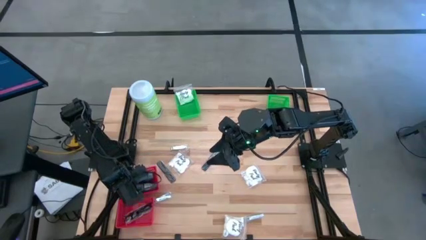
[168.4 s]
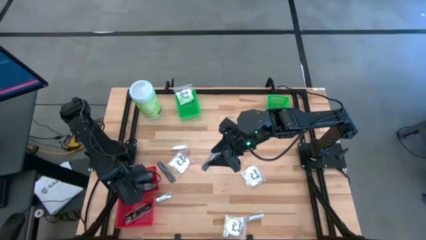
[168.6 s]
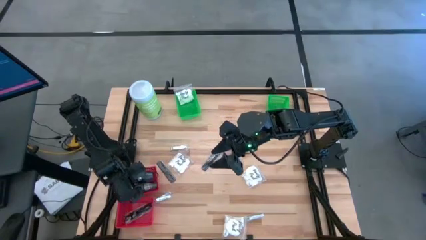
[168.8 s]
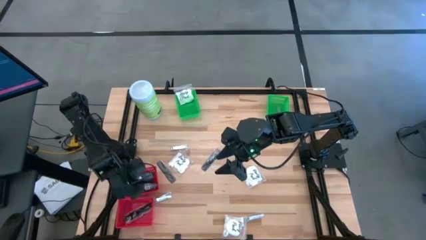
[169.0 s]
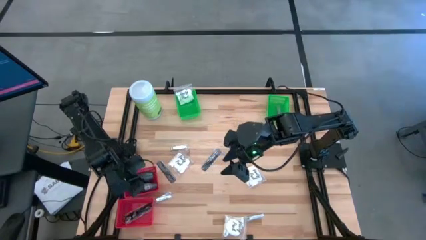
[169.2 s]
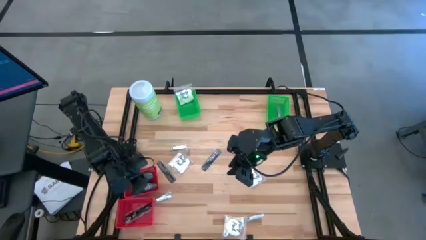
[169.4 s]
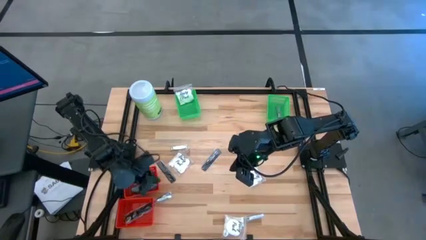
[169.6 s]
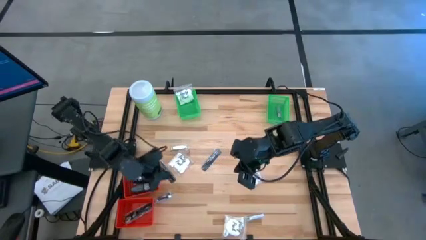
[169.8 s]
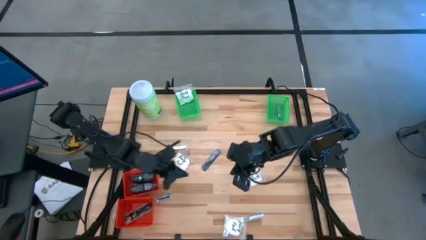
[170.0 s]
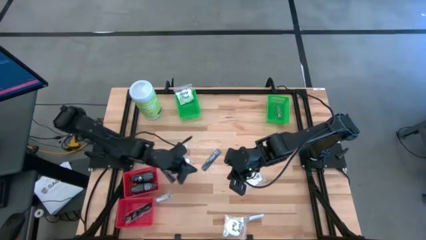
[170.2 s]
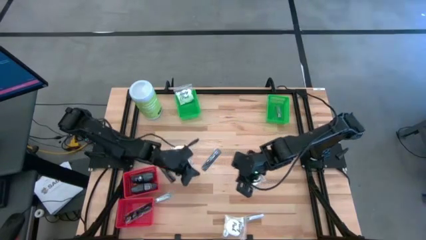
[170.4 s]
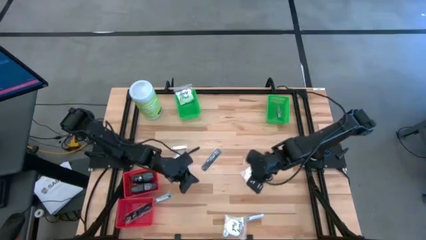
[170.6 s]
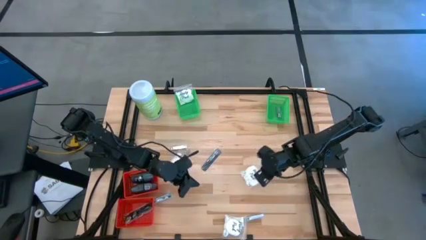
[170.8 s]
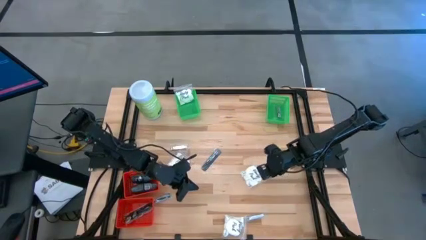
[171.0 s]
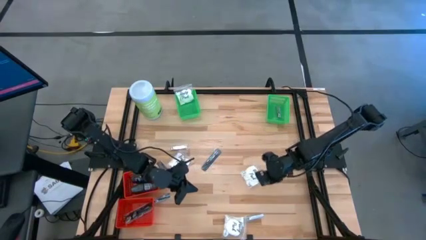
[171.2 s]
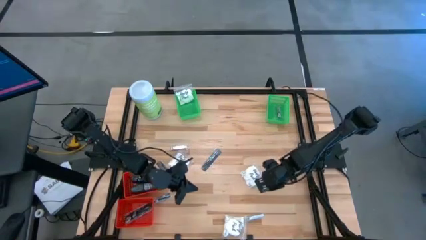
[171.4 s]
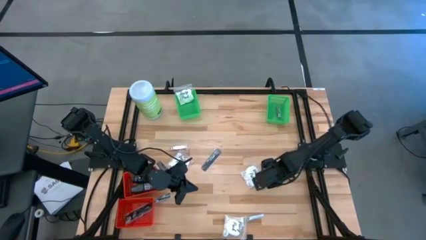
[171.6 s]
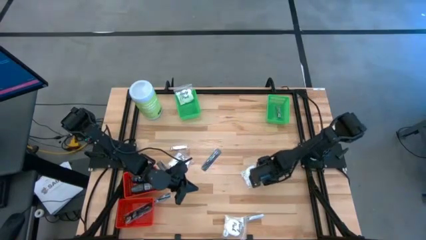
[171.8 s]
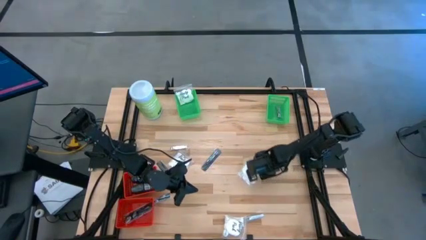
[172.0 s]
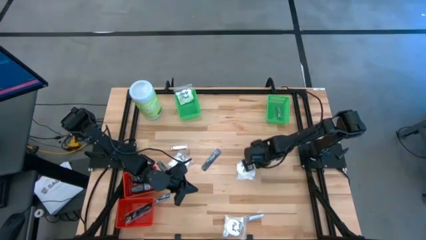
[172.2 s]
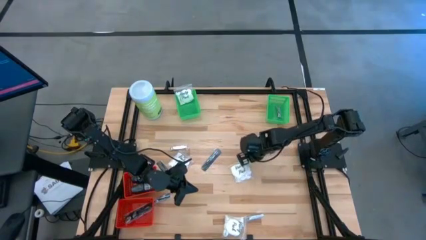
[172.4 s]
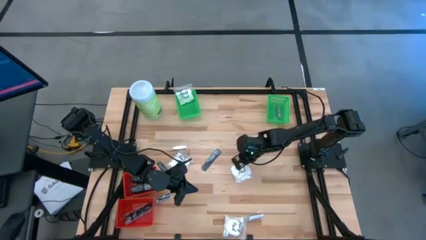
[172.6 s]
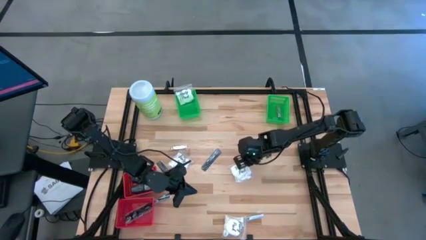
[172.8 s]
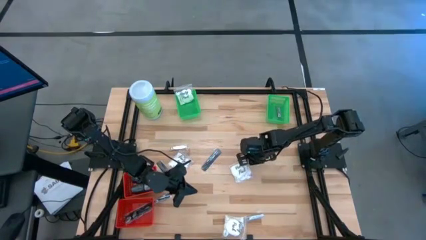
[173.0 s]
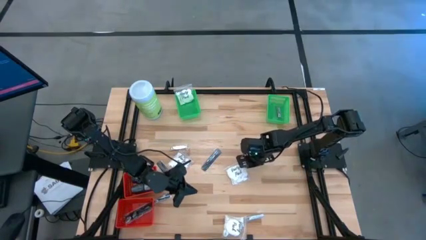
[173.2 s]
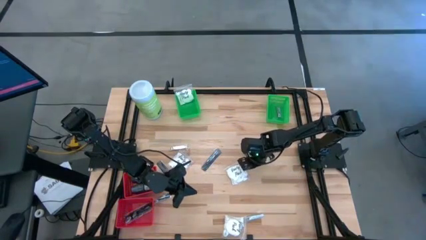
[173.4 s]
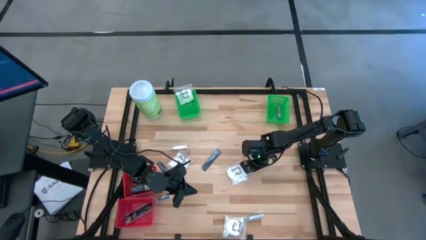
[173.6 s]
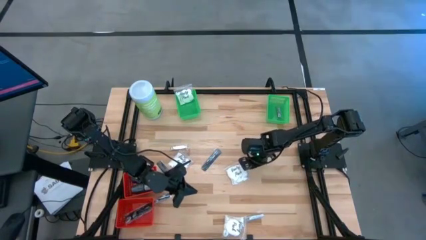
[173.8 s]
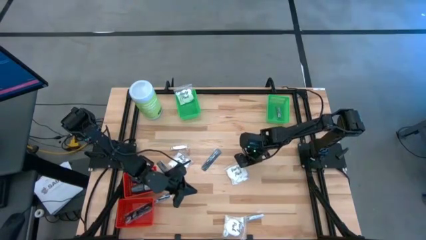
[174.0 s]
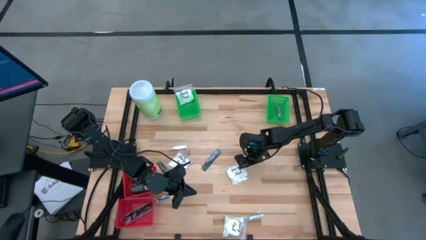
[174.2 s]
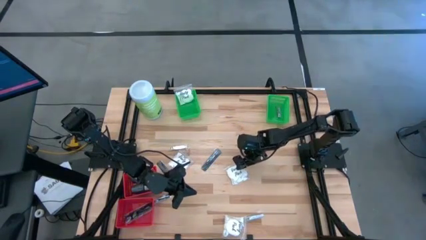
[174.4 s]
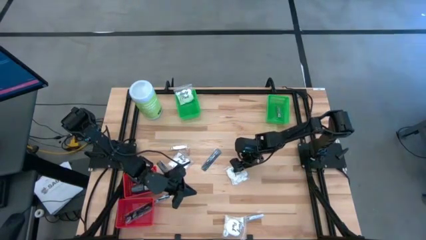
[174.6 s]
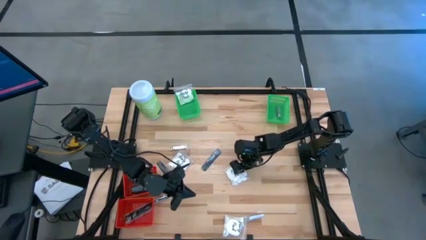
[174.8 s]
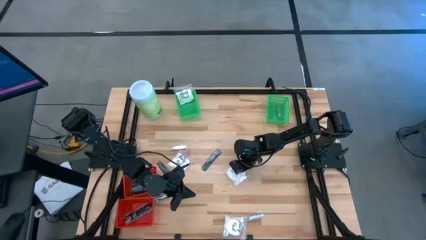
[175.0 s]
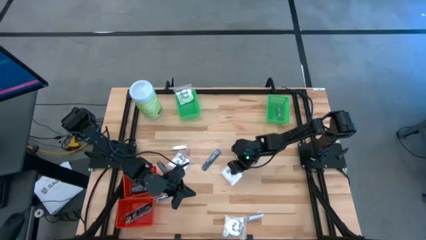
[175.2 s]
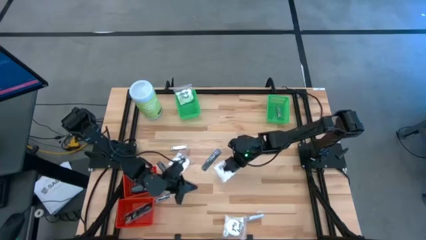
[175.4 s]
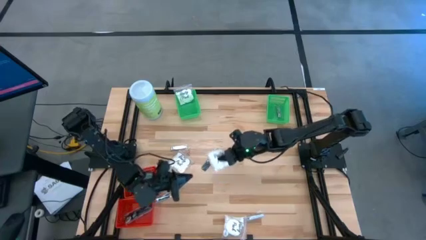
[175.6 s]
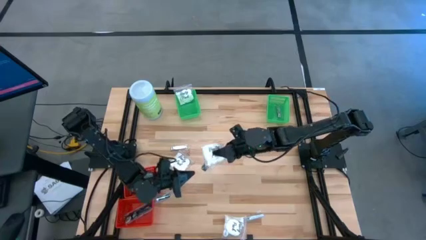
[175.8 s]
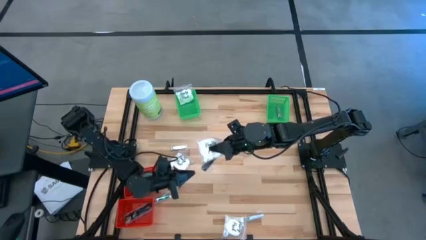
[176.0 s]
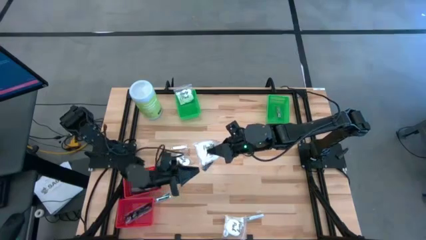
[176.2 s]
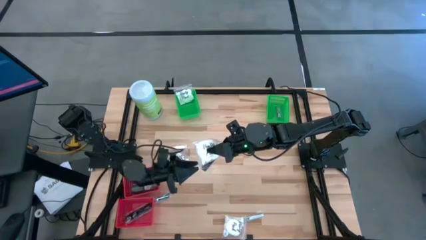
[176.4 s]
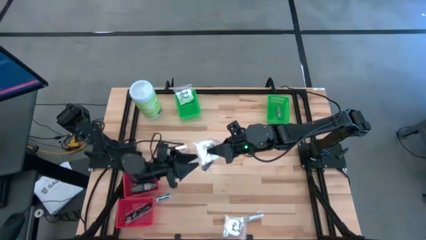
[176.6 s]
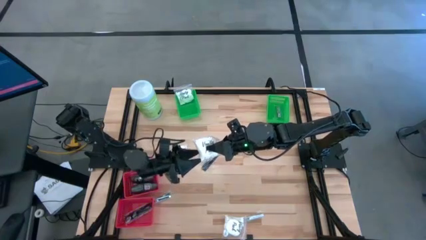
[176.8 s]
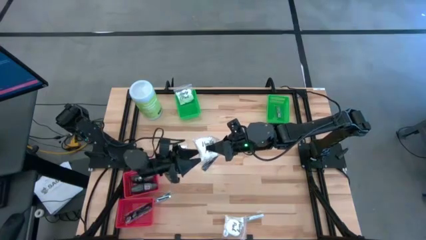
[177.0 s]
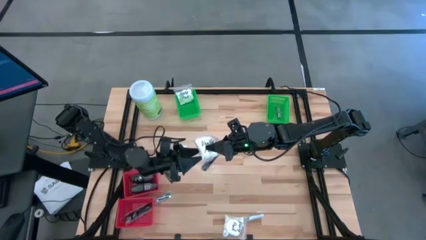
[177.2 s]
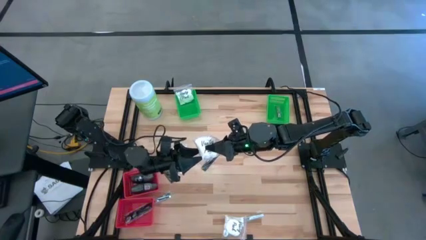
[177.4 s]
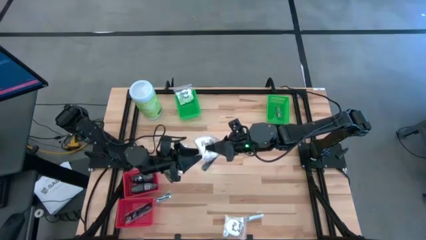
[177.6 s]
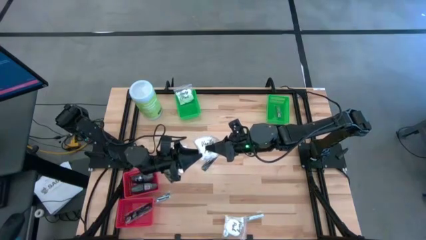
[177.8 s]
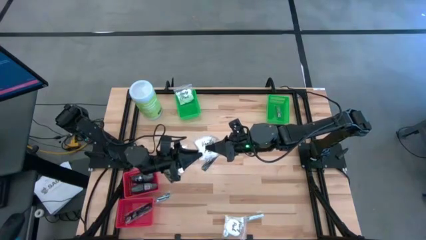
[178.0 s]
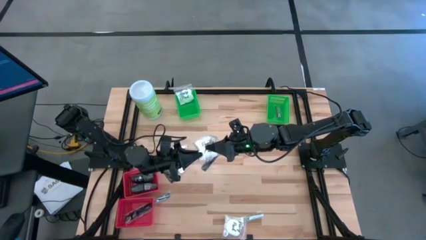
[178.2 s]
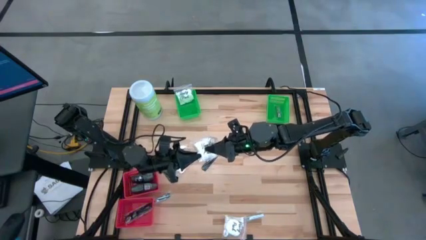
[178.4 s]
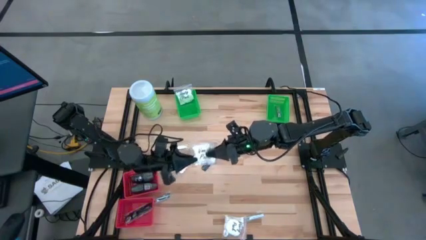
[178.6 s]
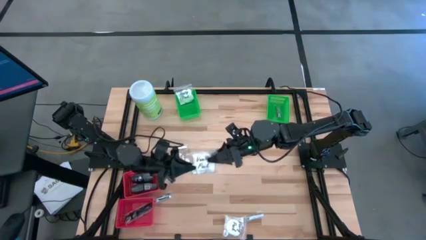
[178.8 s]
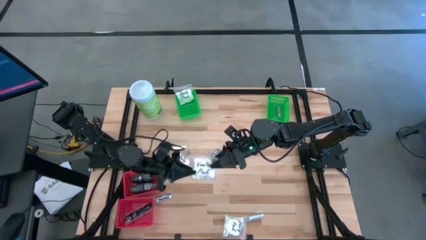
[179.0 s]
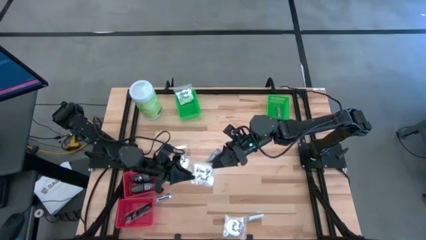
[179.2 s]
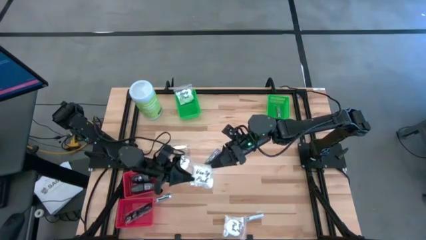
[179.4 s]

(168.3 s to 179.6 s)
Task: Pick & Place Travel size toiletries
Put the white vanity pack into the top left green basket

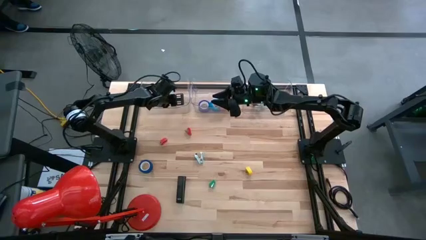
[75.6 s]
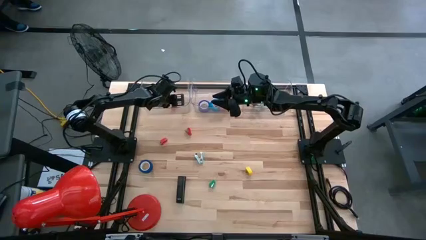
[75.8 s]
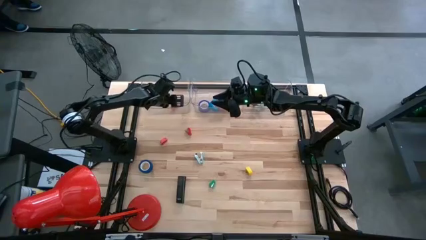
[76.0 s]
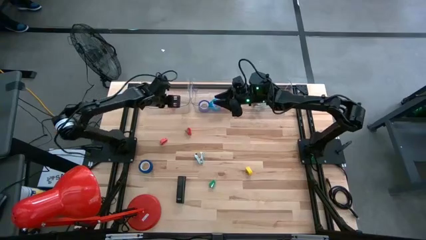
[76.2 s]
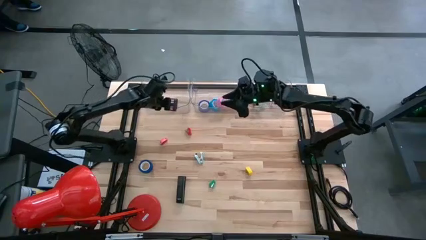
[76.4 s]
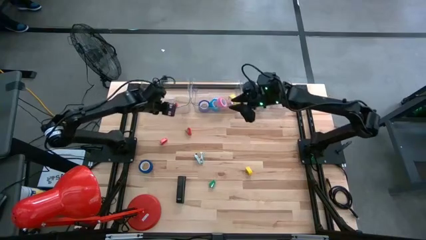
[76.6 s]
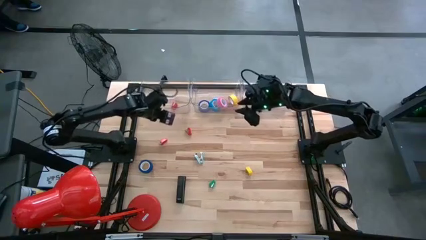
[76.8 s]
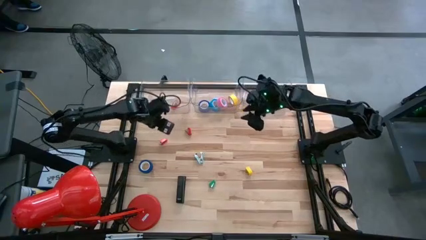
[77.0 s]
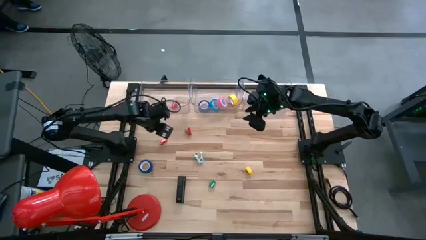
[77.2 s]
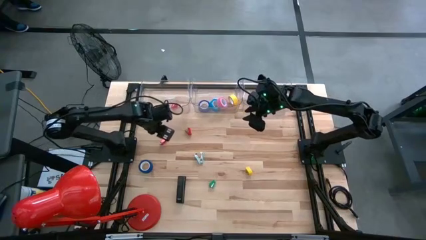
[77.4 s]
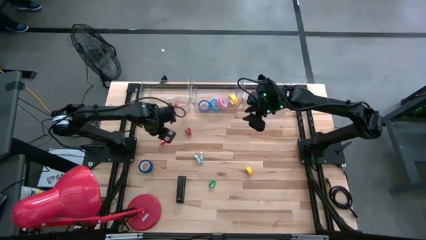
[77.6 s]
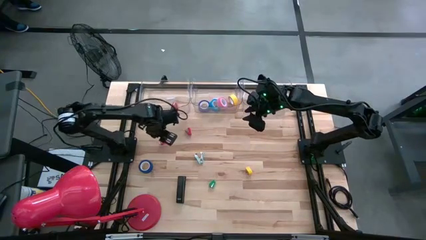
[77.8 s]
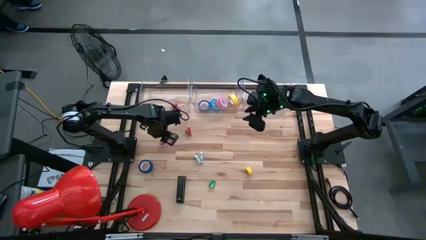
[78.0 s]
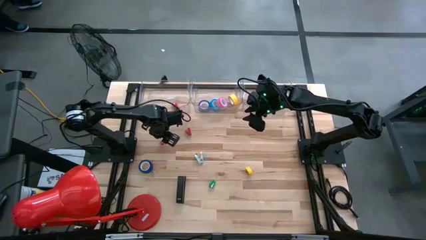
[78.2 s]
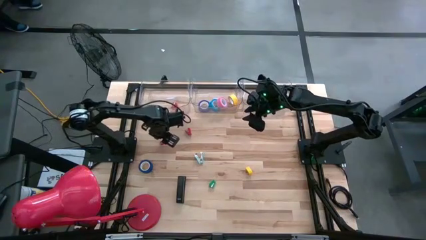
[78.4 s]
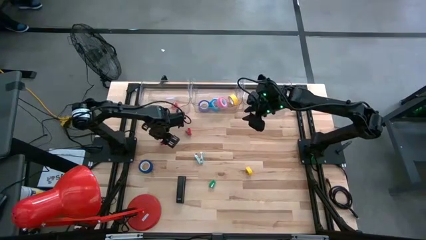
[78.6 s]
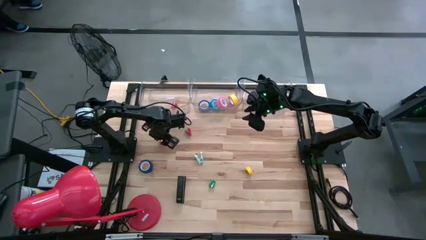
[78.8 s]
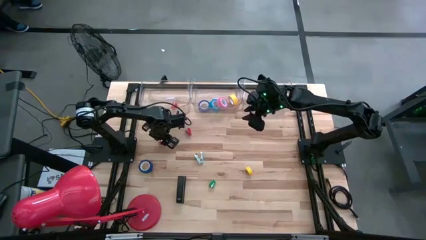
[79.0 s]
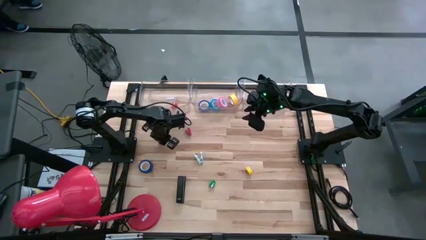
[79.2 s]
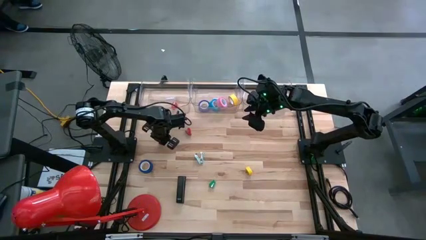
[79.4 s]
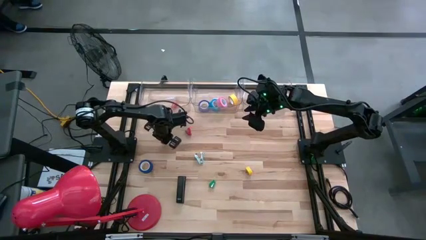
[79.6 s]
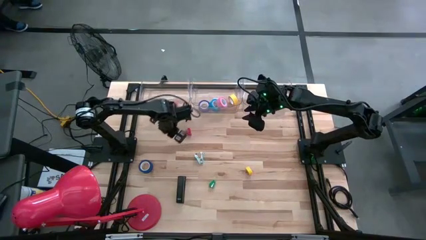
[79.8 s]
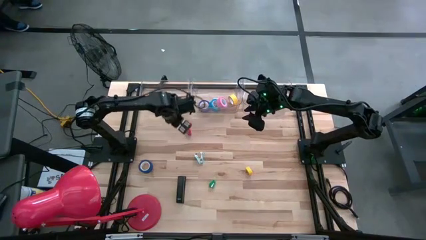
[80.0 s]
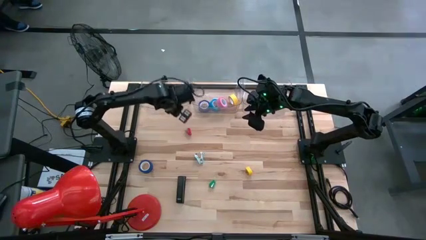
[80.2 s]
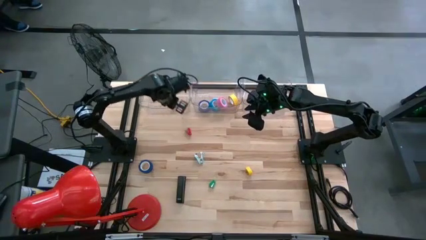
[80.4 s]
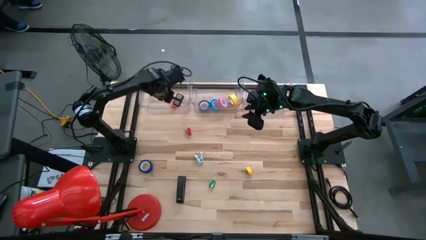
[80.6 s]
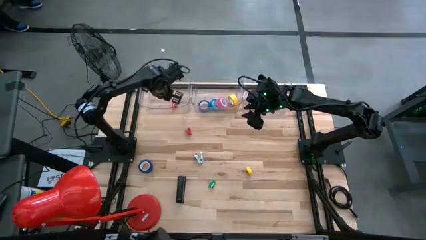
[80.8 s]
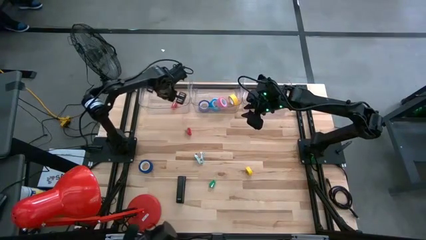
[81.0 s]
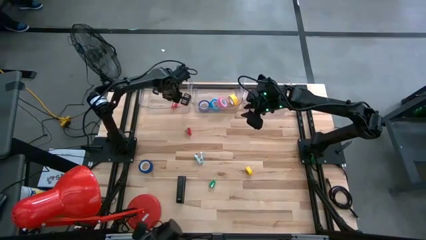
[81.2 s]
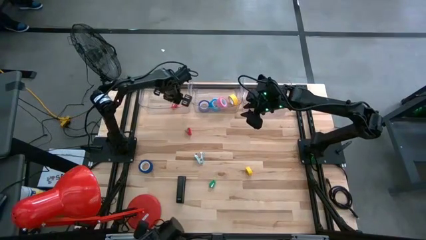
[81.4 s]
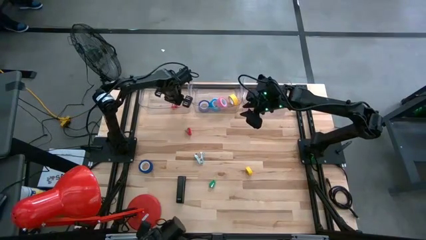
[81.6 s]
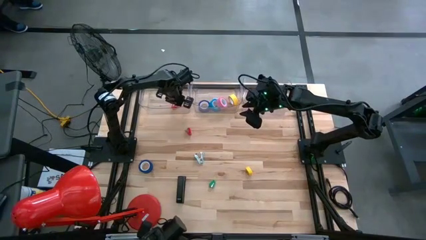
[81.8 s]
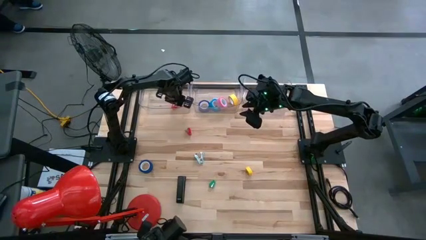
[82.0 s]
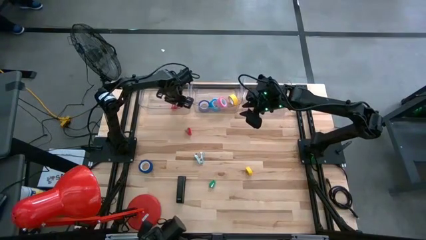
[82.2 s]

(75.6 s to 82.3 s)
Task: Pick and place Stapler, Stapler remover, tape
Put the left red stapler into the left transparent bin
